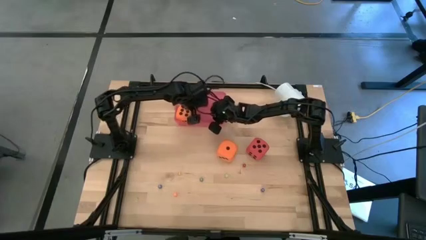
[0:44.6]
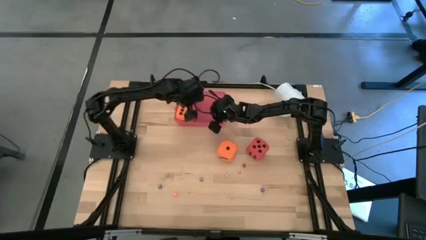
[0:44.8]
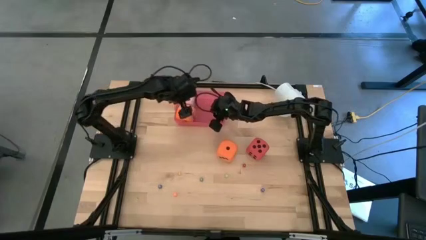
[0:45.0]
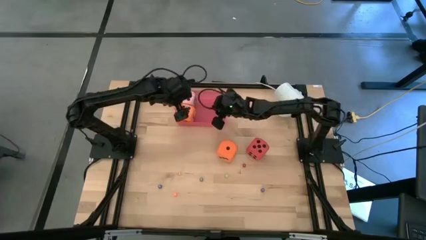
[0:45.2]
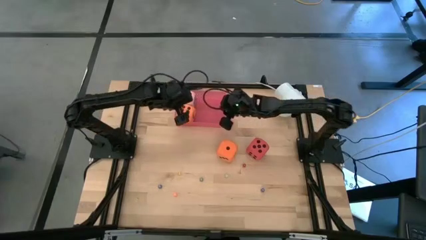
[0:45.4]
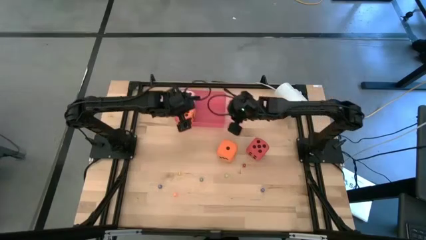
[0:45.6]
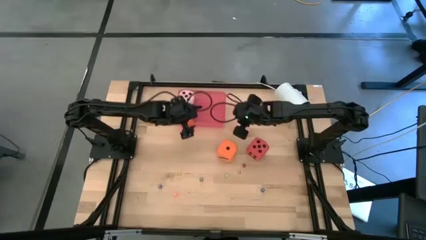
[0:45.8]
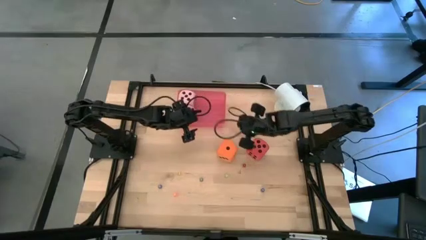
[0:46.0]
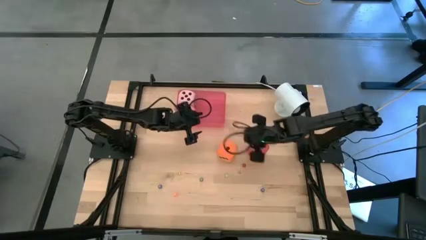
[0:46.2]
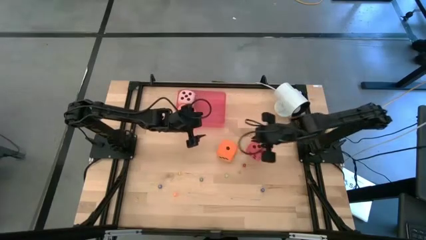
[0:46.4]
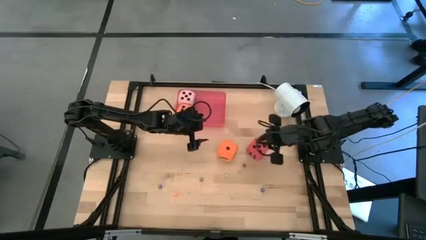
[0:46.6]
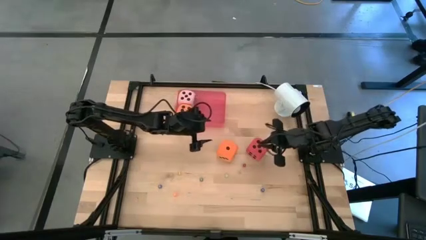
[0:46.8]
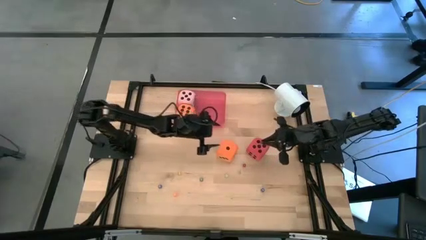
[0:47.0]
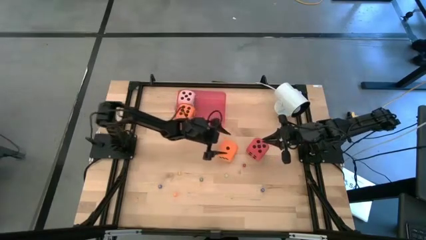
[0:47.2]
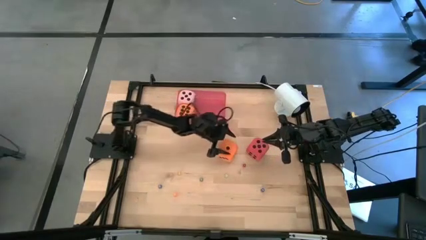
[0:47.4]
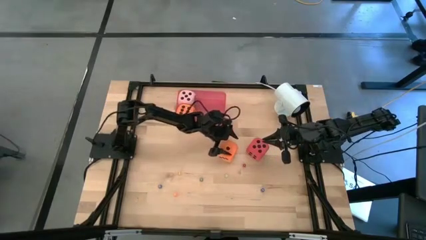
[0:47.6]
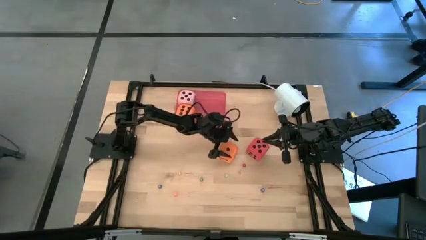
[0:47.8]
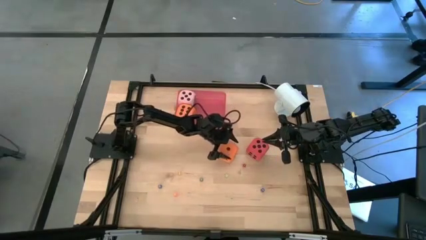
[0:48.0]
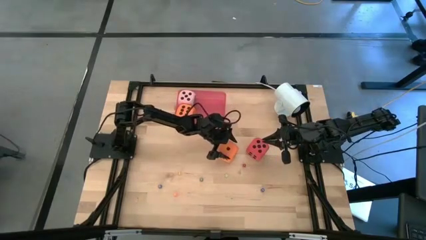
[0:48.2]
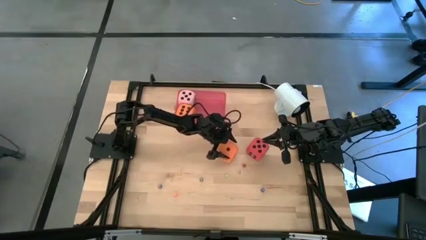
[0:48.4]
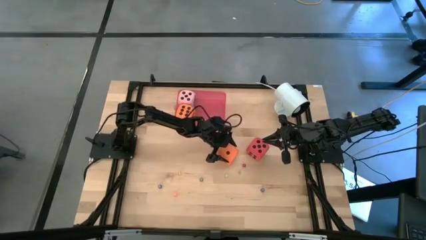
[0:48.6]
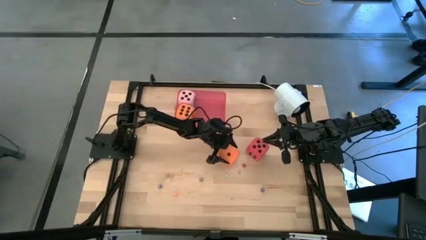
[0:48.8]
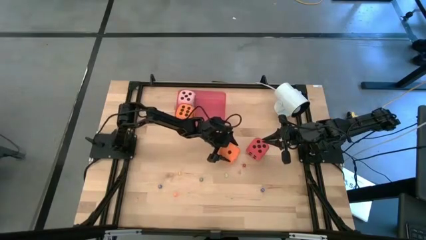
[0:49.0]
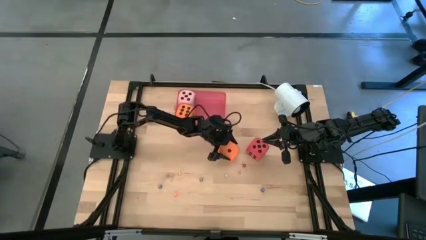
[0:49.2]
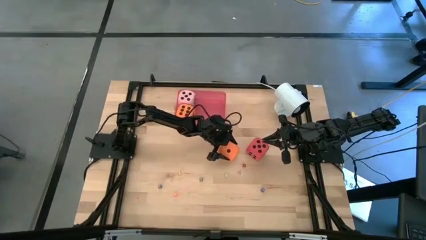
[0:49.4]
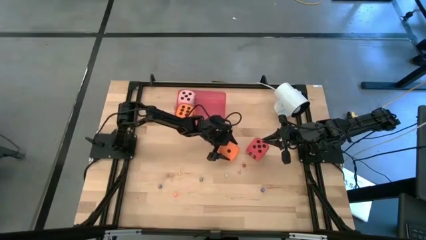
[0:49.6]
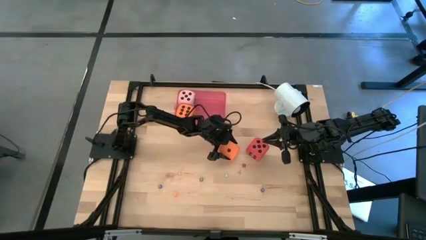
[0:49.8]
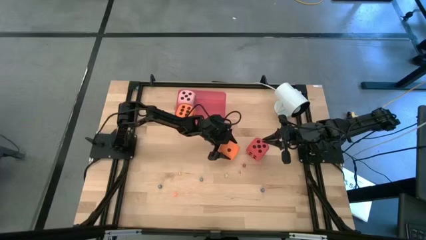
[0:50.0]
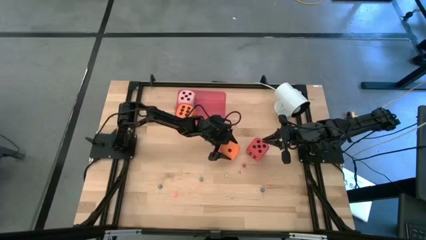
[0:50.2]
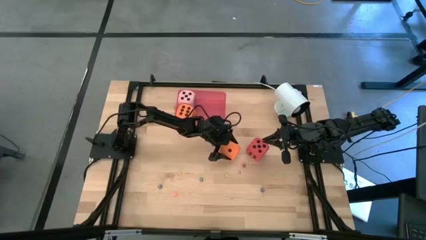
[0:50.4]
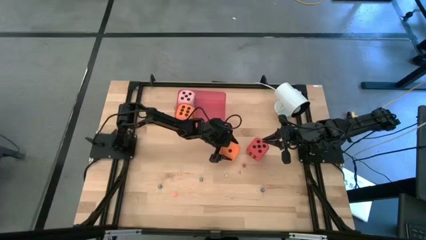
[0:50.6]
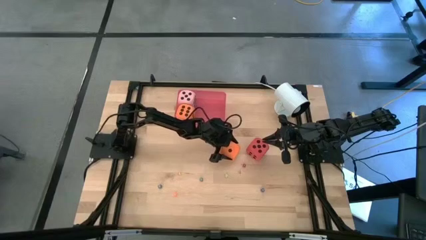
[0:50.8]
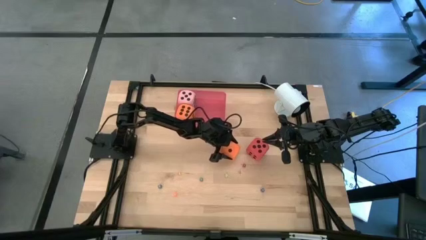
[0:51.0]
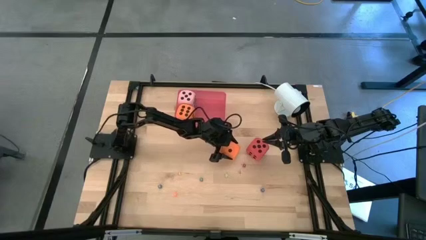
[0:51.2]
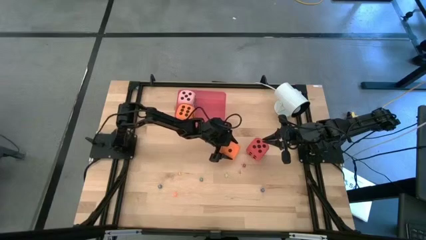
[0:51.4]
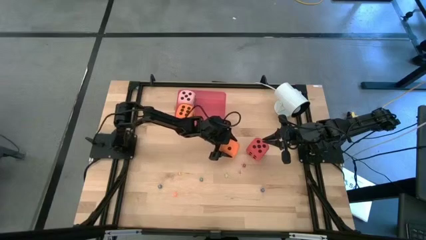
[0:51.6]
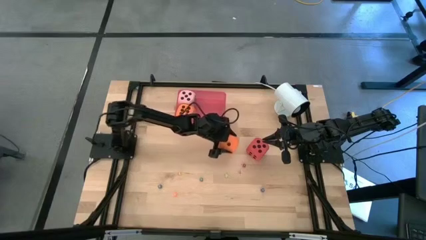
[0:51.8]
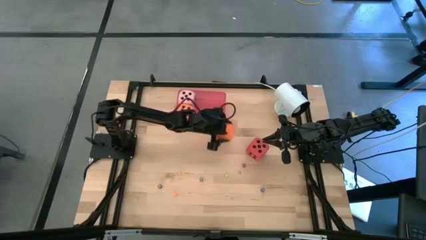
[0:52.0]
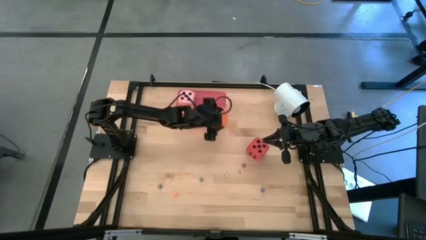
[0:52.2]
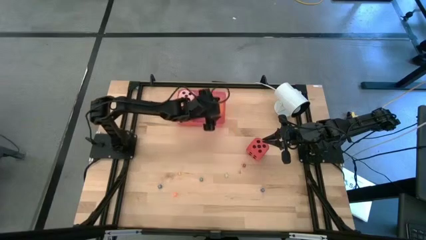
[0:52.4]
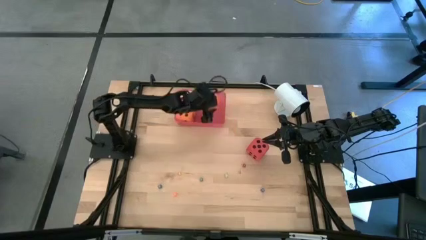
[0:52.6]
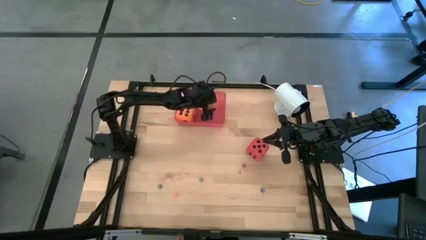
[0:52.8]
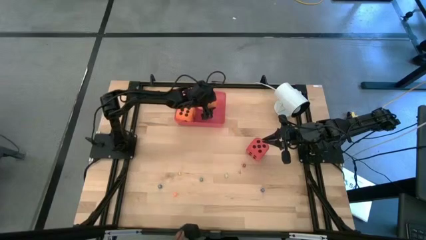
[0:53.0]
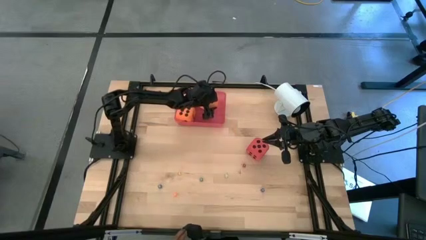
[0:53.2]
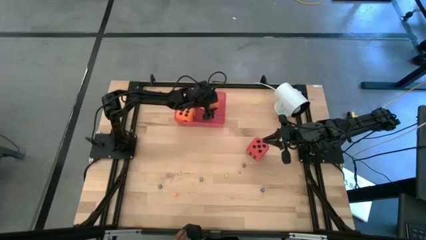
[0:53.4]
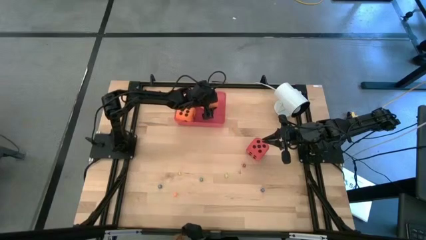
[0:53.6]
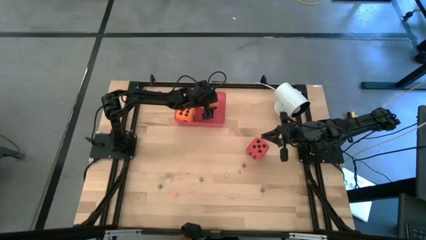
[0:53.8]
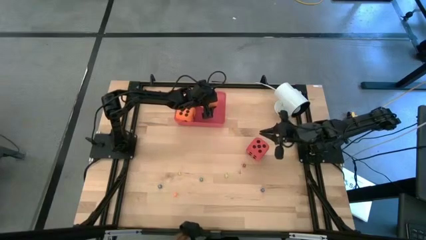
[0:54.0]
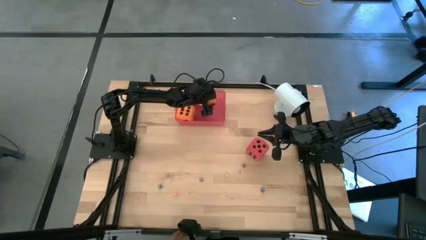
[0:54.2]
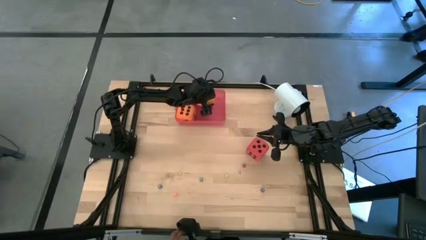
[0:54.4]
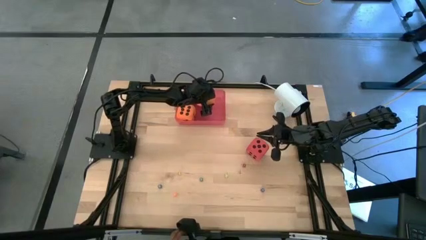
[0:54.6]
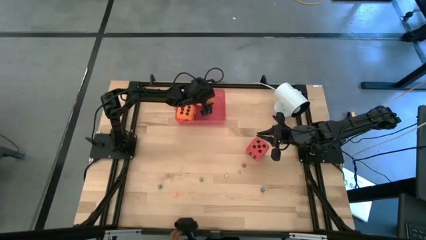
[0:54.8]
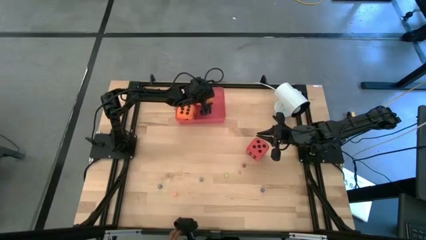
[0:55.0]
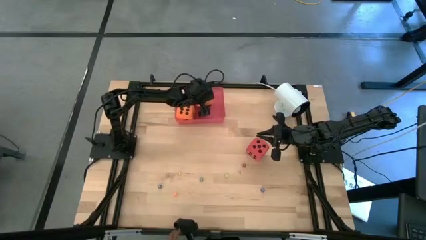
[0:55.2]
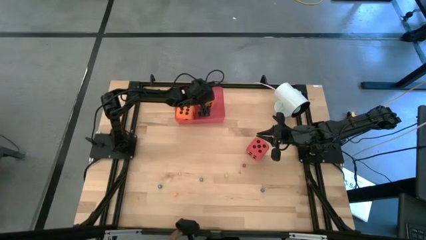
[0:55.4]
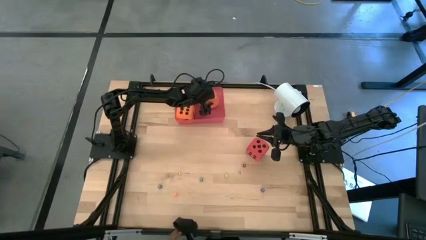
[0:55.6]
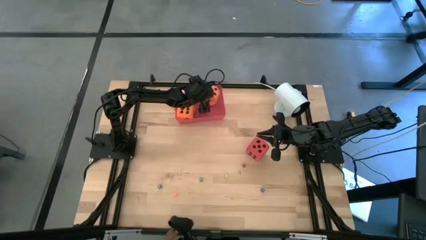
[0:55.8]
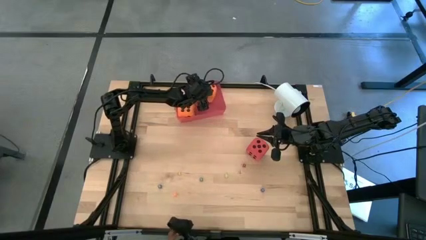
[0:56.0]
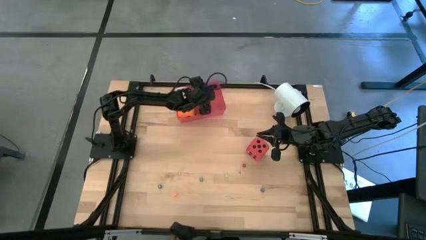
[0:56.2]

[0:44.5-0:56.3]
Task: Pick & Place Dice
Put the large orange die into the red bin
